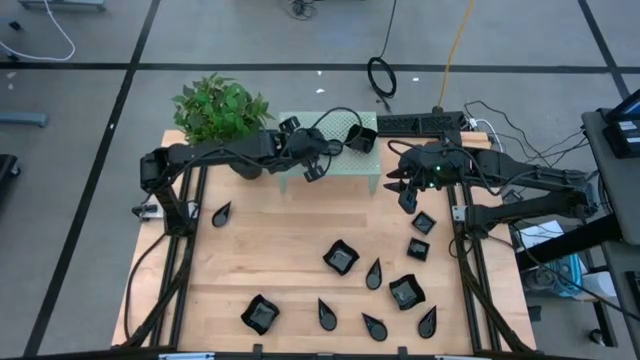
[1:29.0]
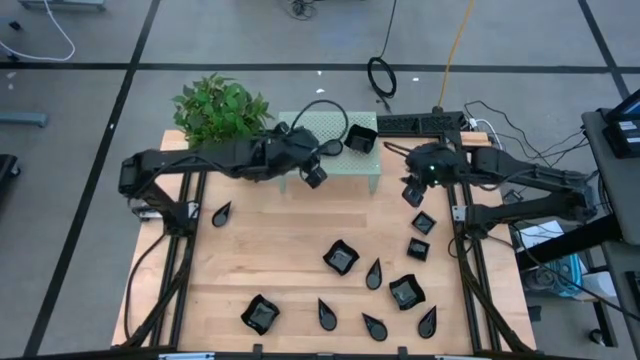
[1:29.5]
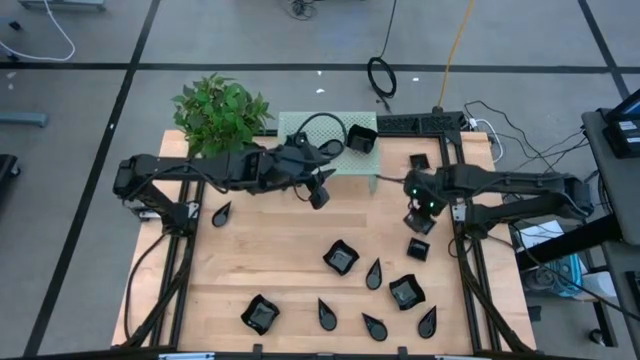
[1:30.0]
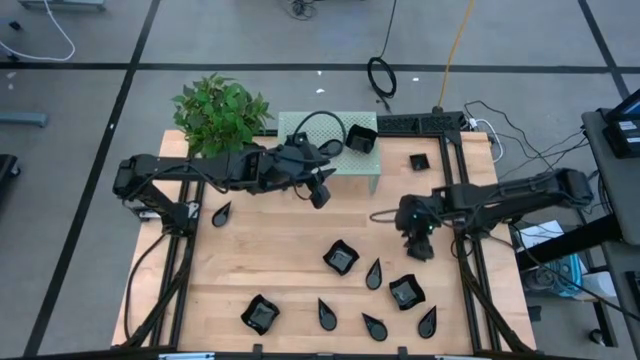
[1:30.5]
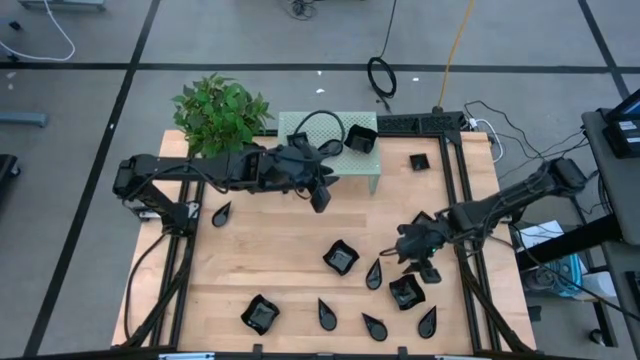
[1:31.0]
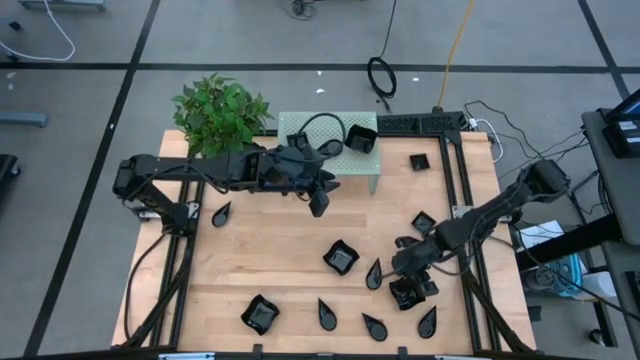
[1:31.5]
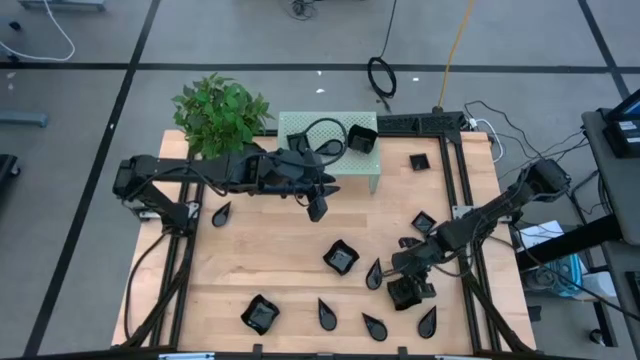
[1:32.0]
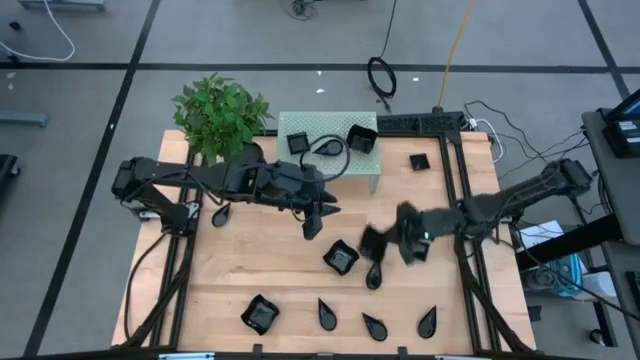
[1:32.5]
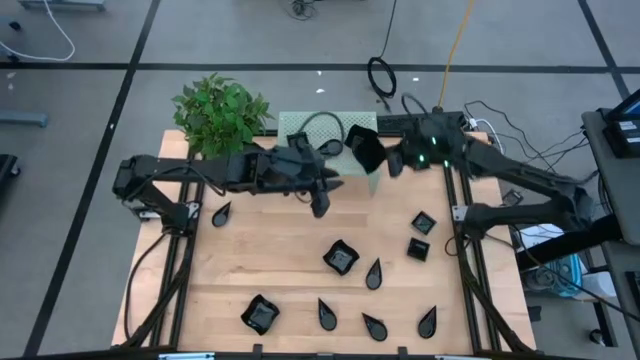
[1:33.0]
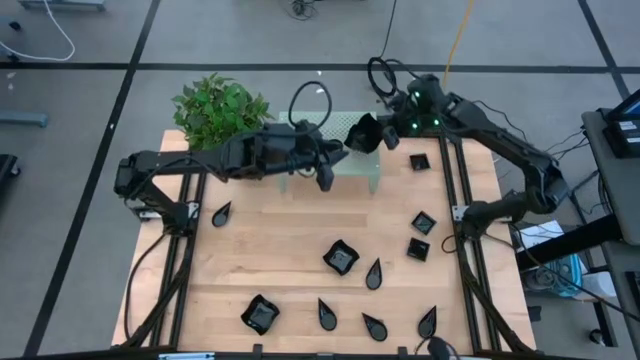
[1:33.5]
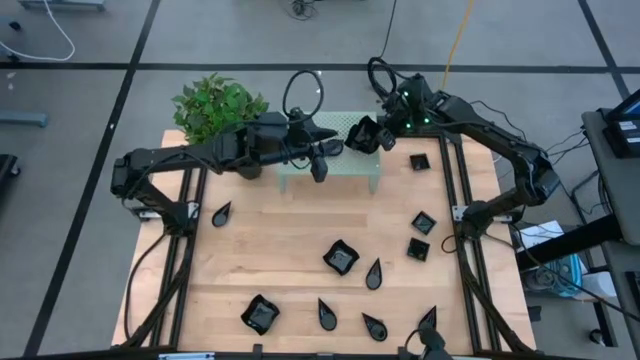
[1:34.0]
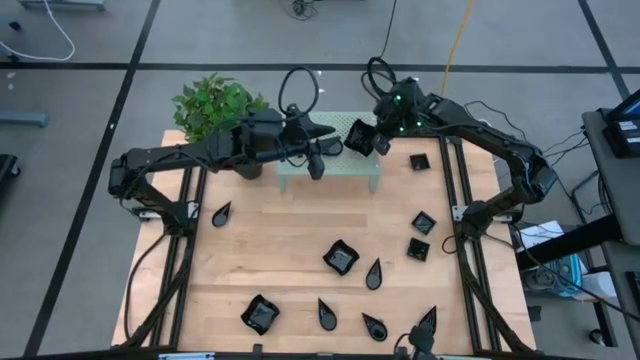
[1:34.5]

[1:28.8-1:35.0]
Task: Pick & Place Mini shaped plates
Stack the distorted square plate on top of the other distorted square plate on the shelf

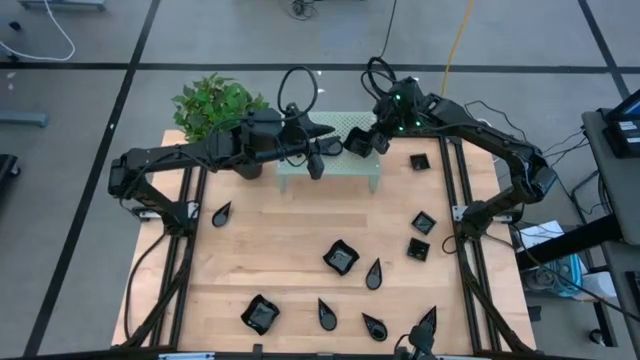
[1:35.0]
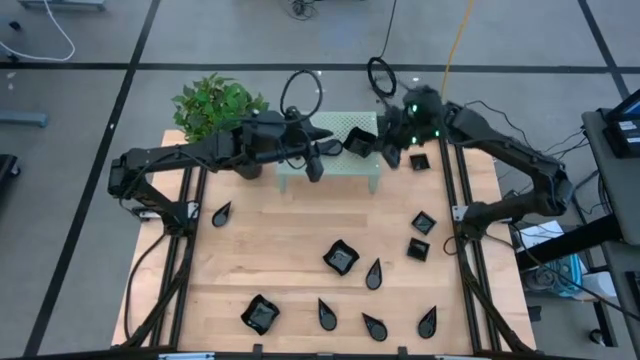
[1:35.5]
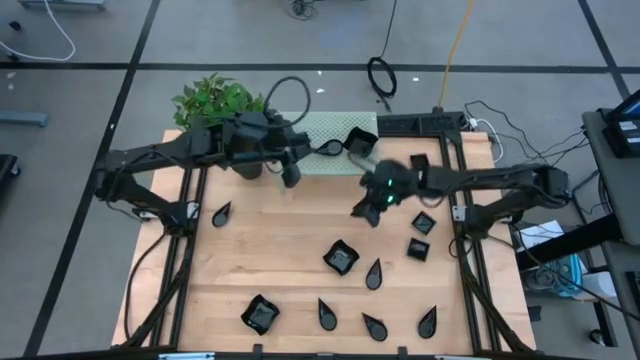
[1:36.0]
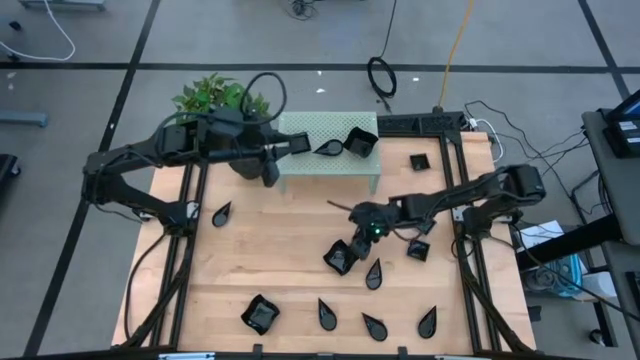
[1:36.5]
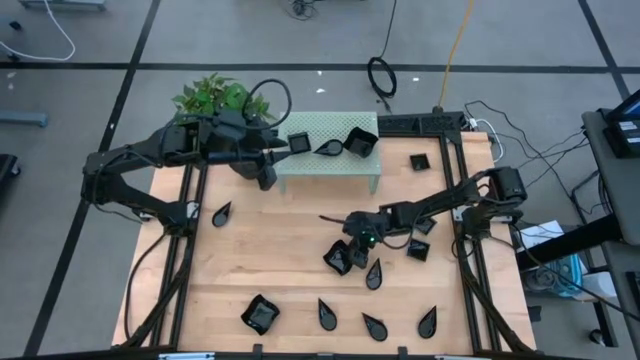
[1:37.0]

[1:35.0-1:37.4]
Stack the distorted square plate on top of the other distorted square plate on the shelf

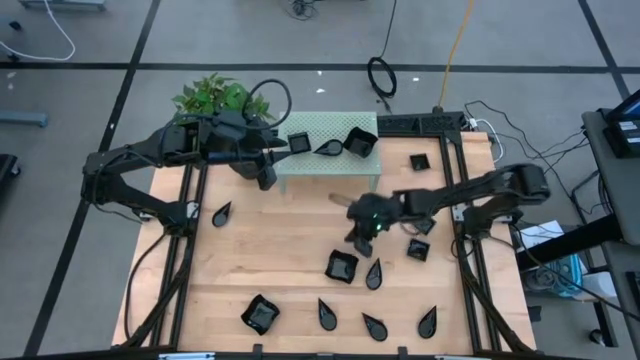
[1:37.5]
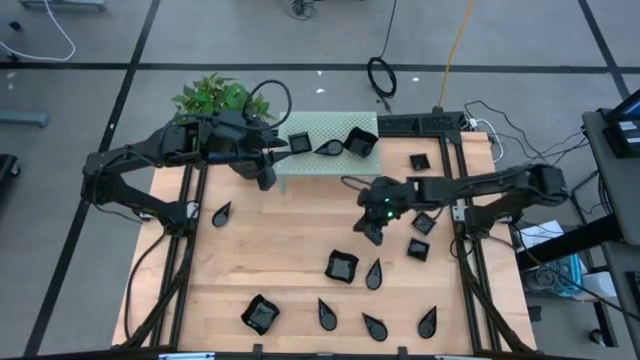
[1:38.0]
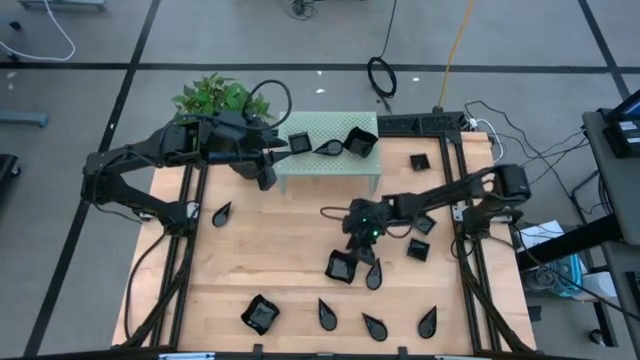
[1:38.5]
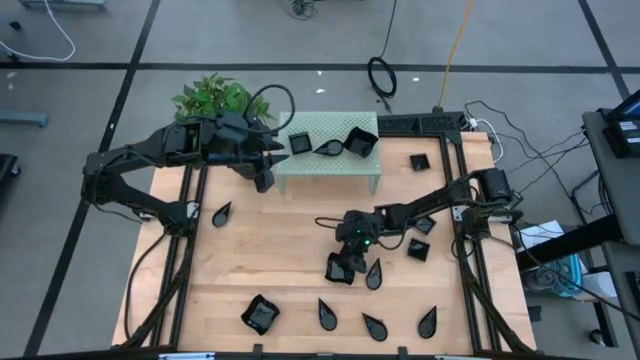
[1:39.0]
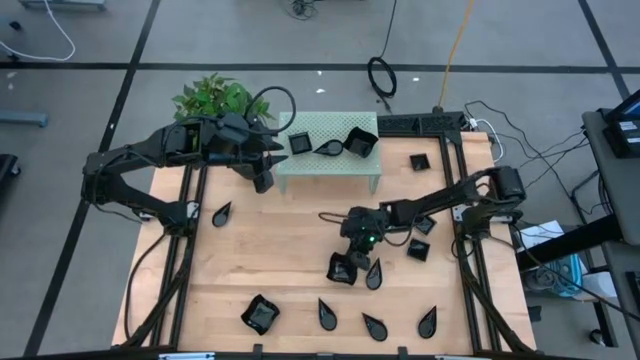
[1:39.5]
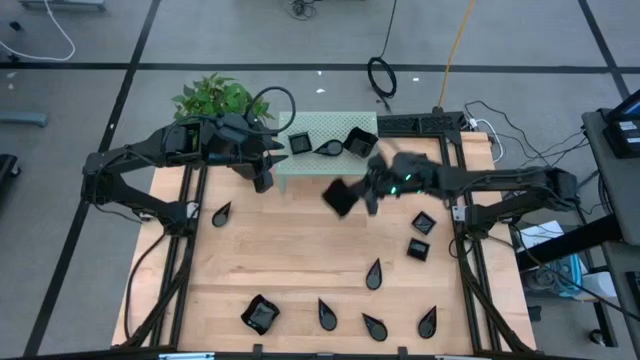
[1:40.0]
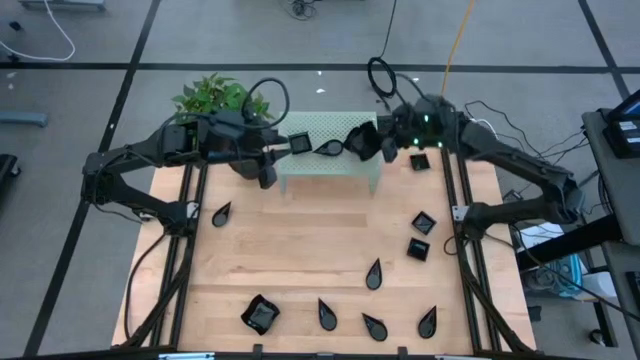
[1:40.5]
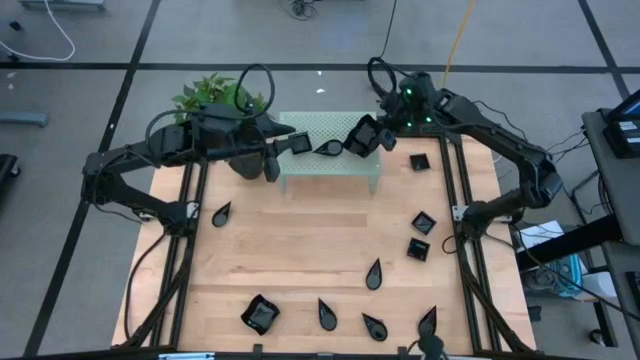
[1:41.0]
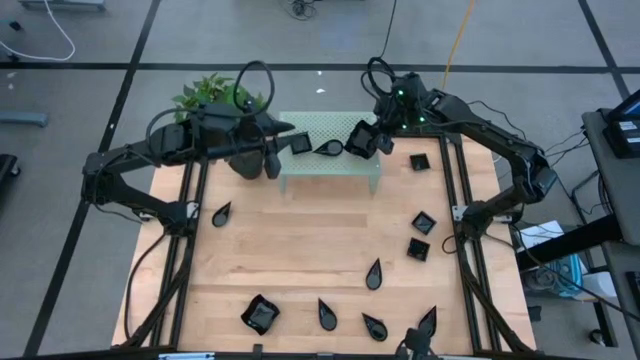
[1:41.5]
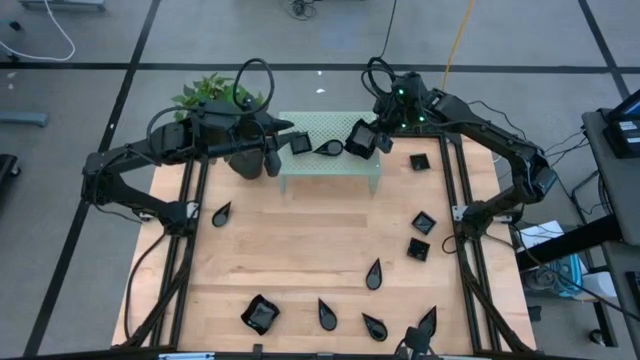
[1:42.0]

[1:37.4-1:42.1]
Stack the distorted square plate on top of the other distorted square plate on the shelf

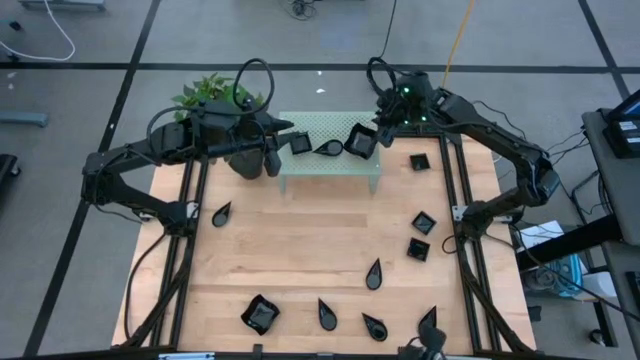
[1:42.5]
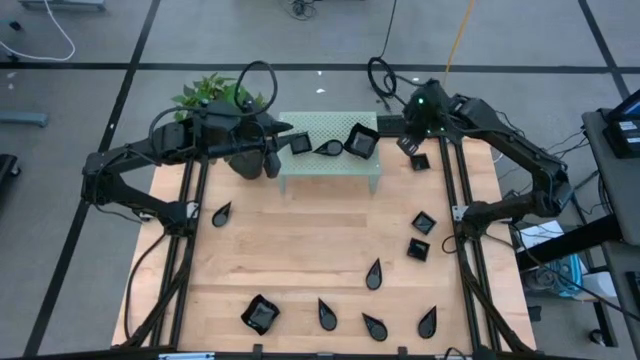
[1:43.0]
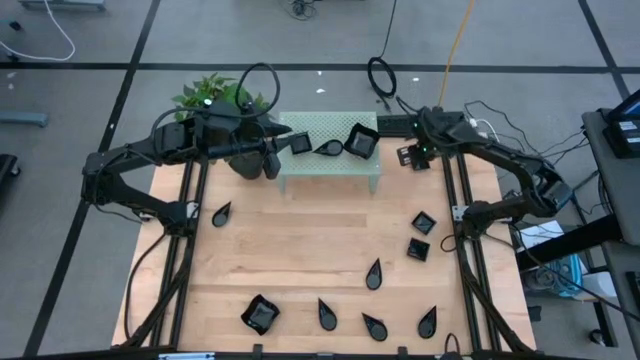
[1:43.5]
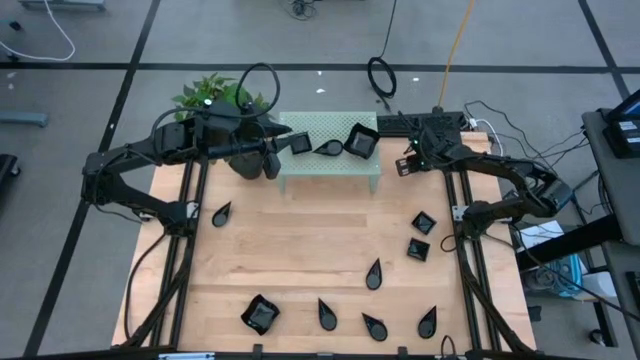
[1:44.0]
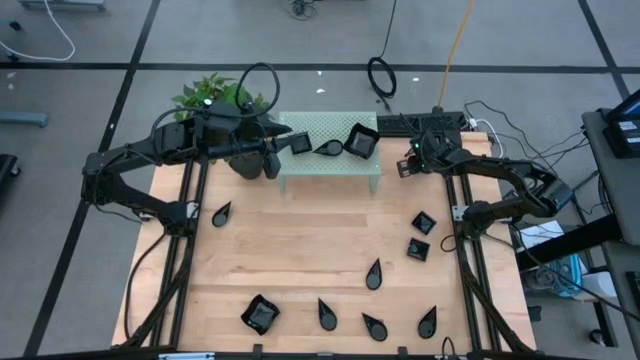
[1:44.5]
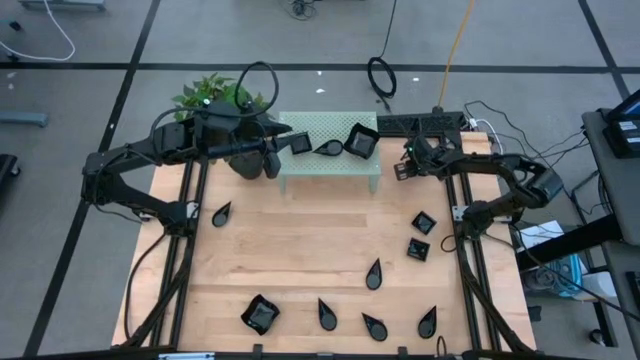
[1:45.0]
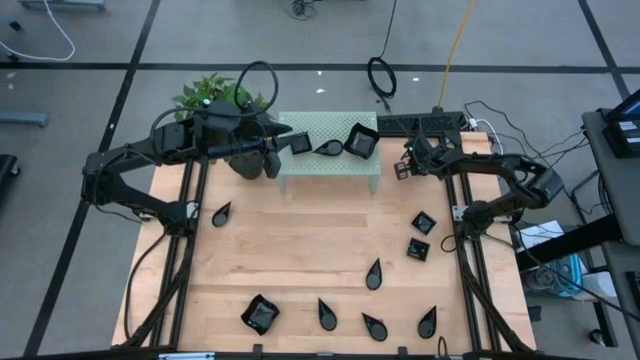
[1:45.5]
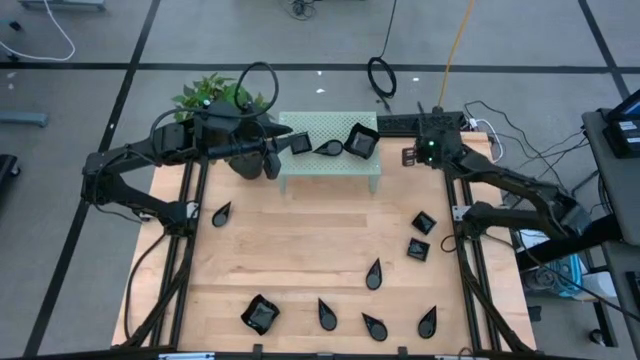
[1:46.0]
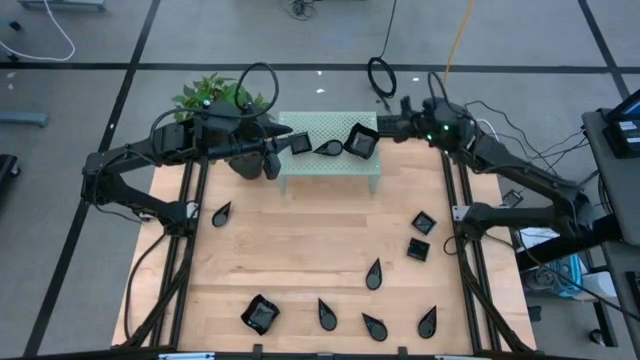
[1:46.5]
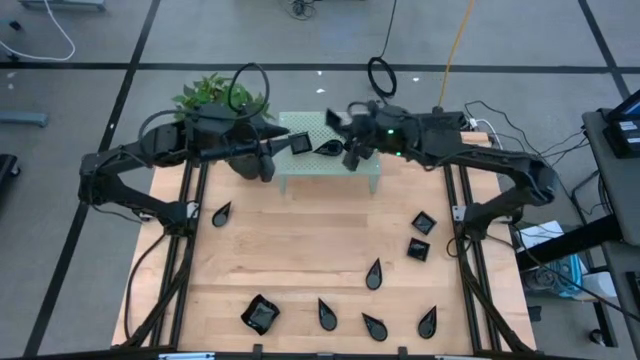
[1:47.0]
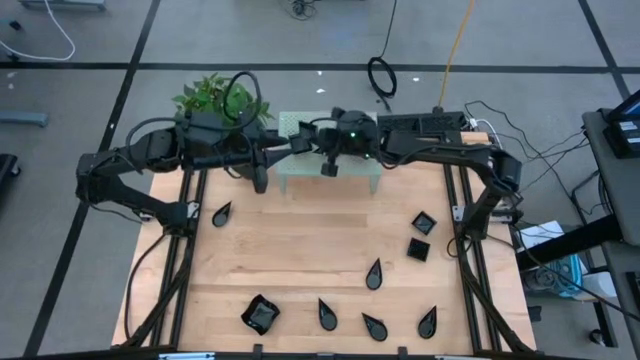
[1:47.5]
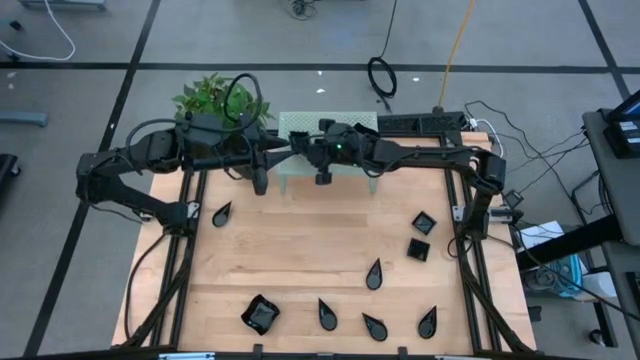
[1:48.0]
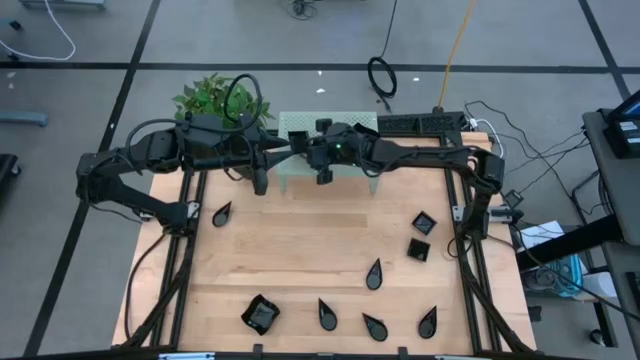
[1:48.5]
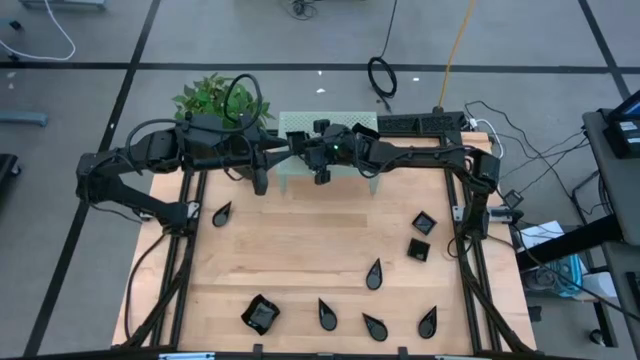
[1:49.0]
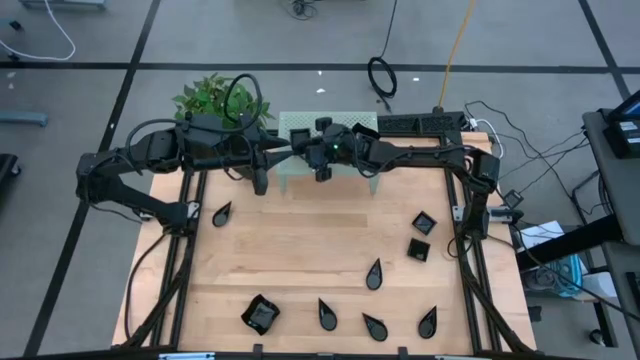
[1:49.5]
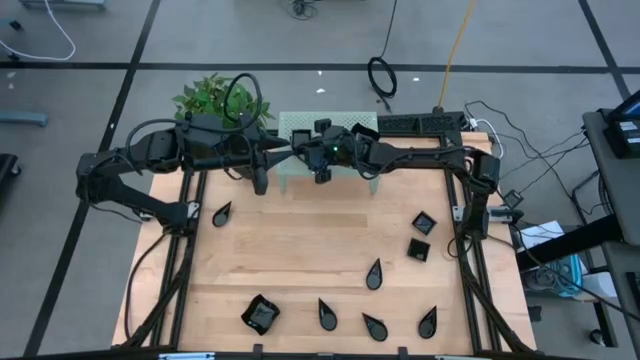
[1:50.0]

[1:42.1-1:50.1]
Stack the square plate on top of the other square plate on the shelf

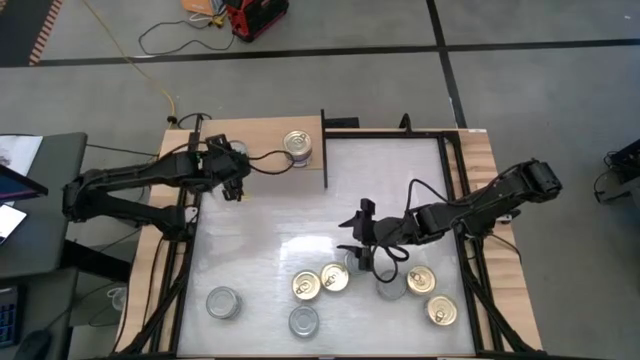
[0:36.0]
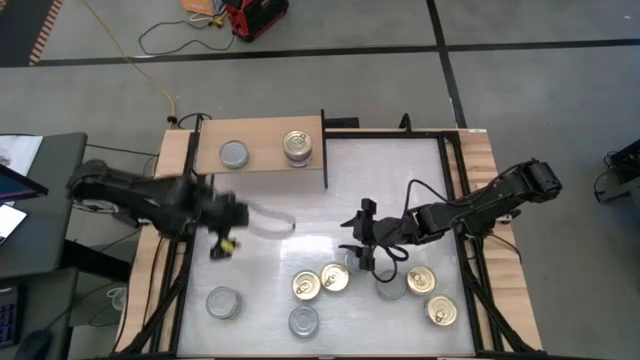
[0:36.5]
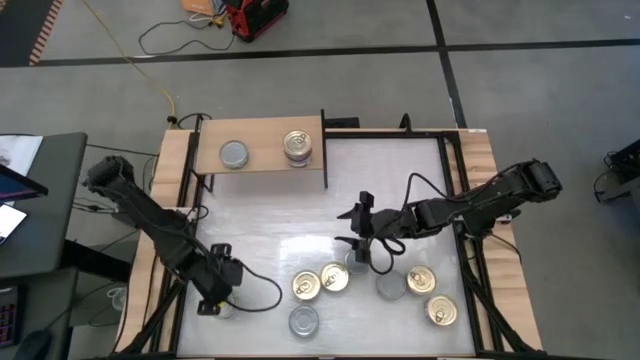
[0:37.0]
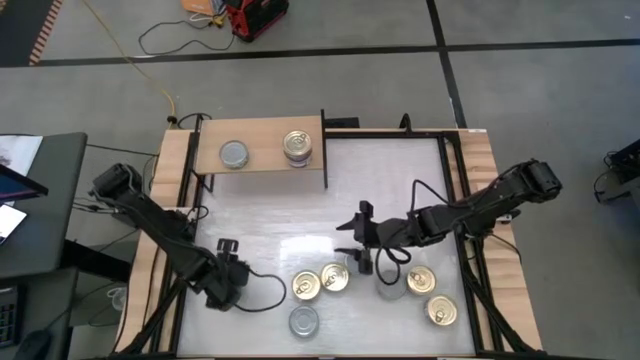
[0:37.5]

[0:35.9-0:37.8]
Task: Stack canned seafood by type on shelf
Move the stacked green-white tuna can to the middle left of the table
